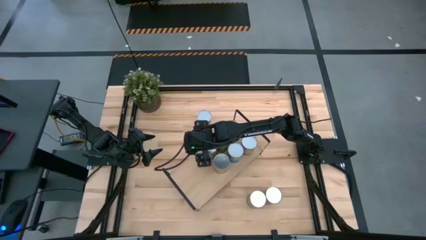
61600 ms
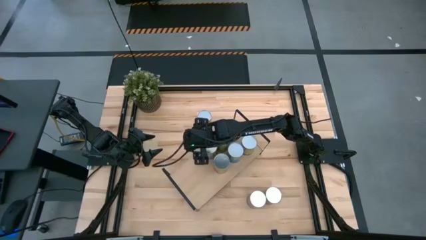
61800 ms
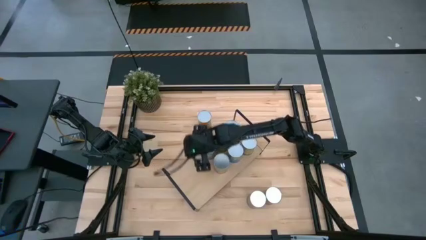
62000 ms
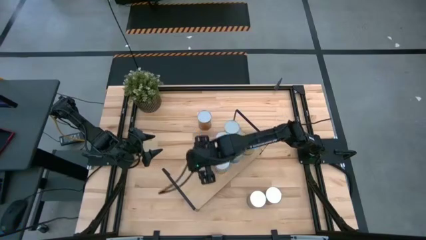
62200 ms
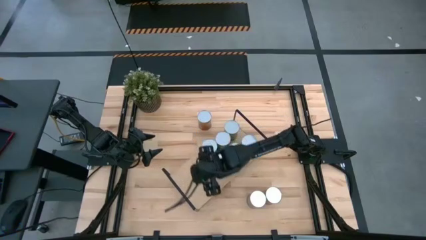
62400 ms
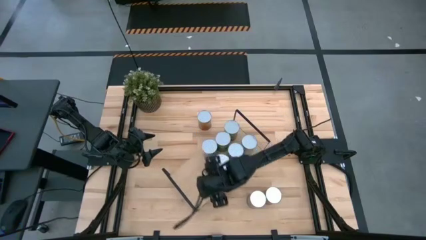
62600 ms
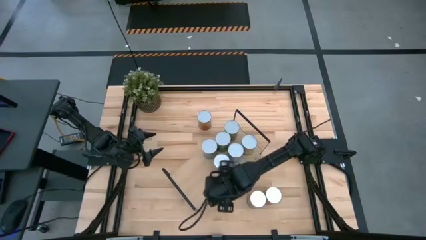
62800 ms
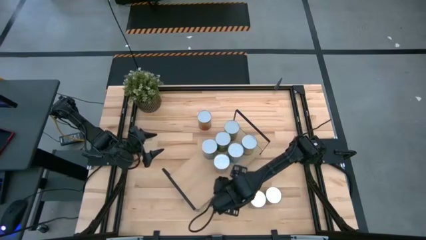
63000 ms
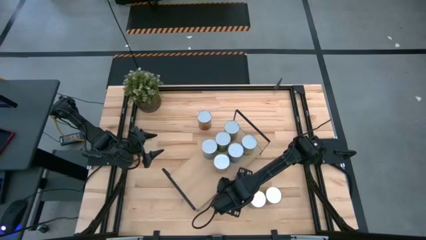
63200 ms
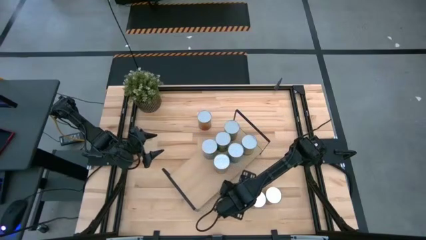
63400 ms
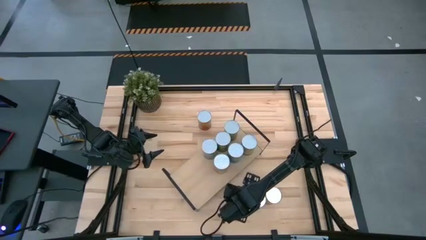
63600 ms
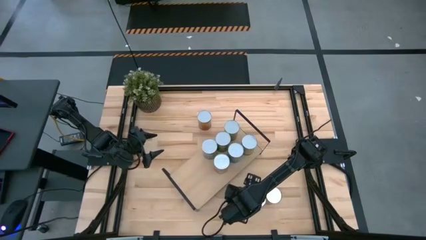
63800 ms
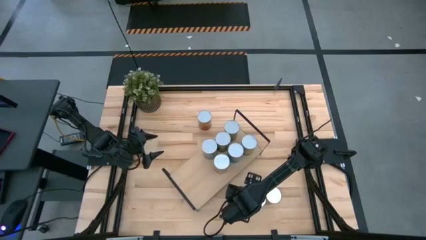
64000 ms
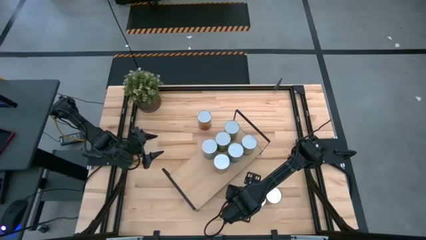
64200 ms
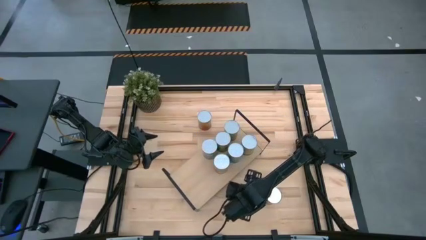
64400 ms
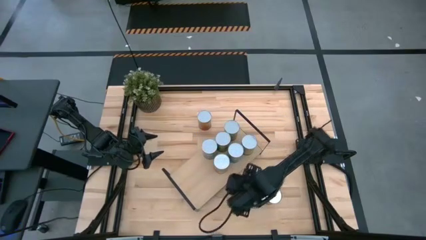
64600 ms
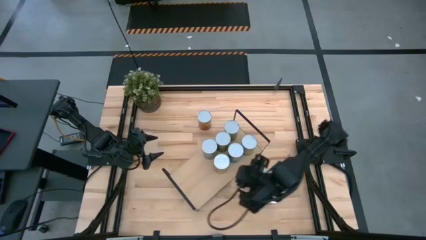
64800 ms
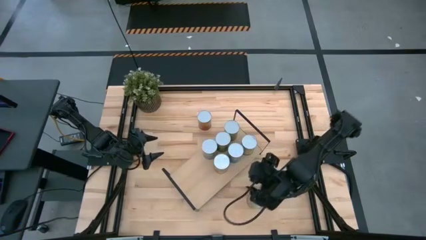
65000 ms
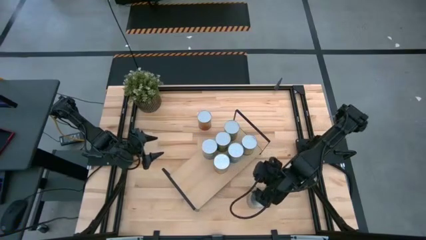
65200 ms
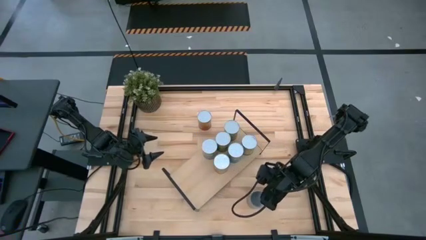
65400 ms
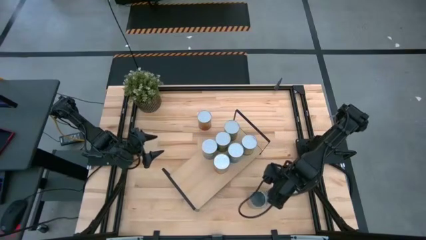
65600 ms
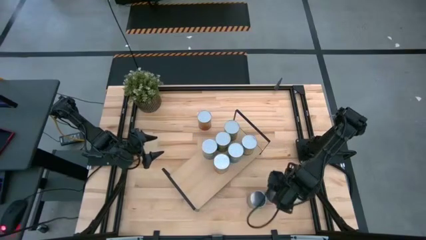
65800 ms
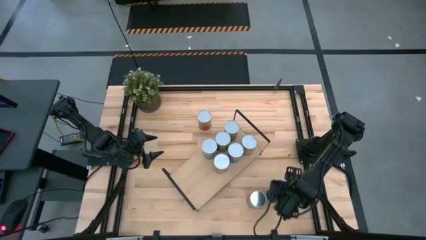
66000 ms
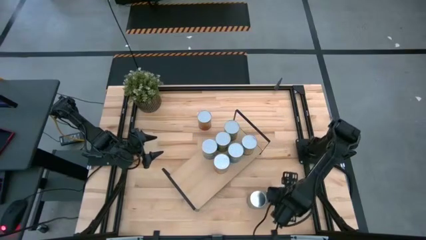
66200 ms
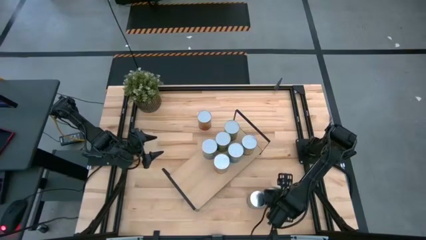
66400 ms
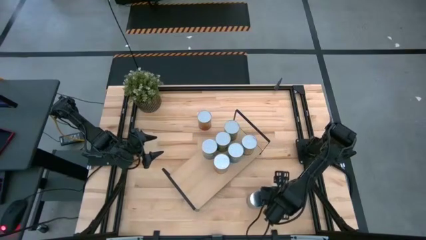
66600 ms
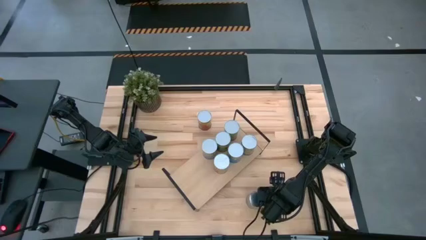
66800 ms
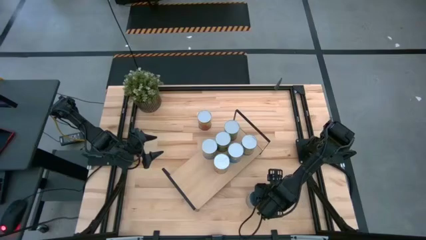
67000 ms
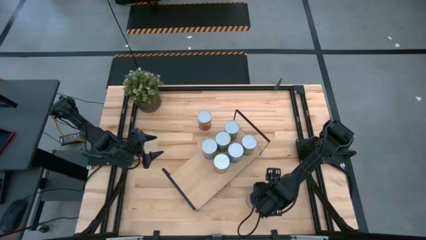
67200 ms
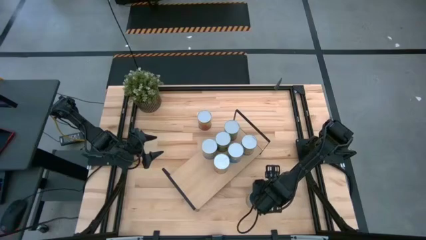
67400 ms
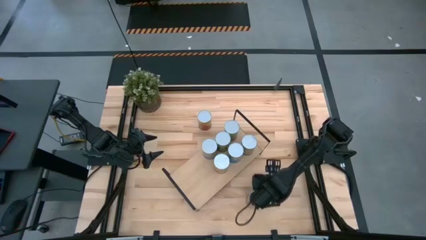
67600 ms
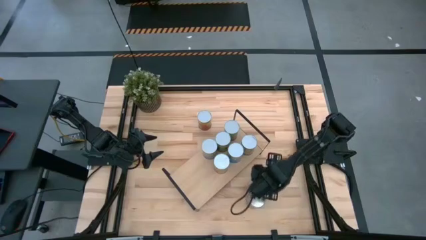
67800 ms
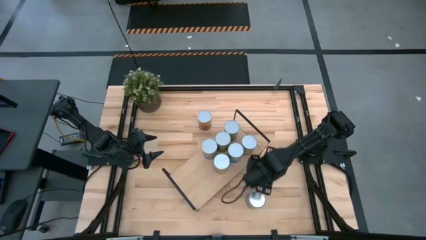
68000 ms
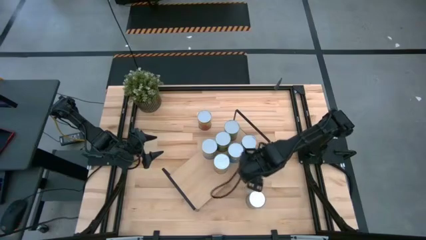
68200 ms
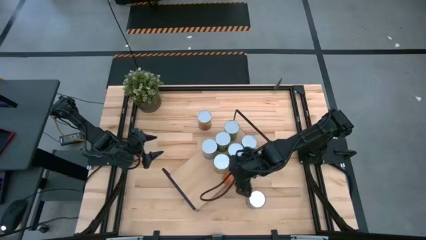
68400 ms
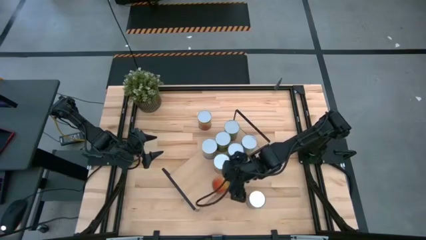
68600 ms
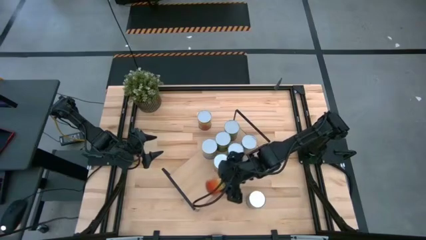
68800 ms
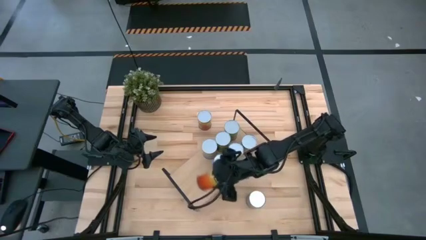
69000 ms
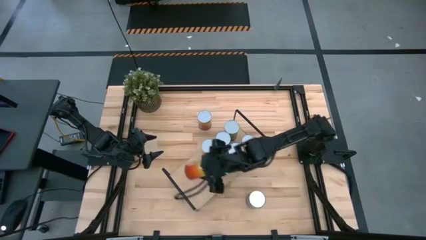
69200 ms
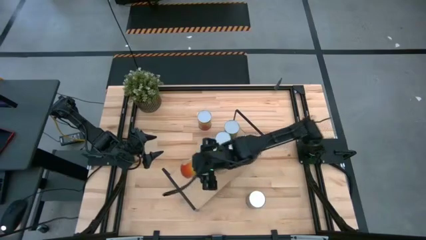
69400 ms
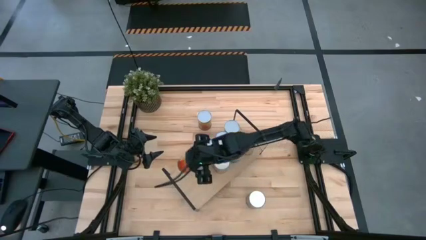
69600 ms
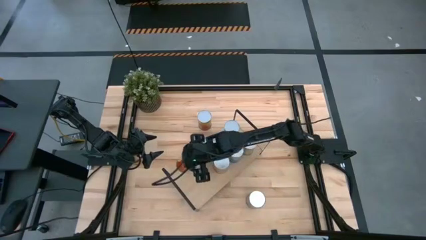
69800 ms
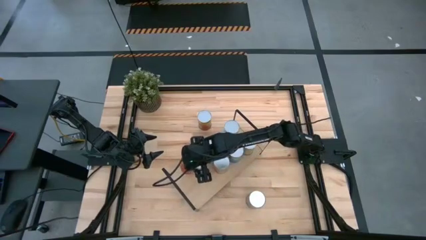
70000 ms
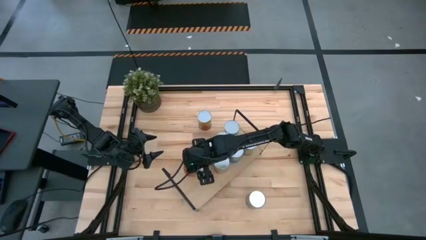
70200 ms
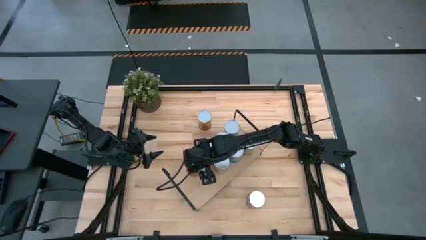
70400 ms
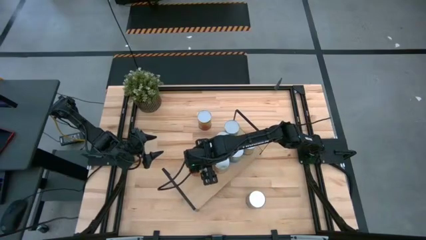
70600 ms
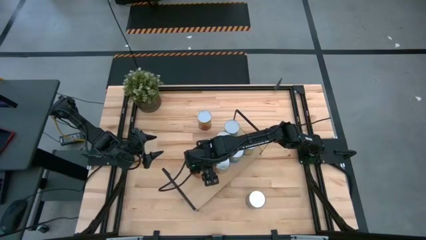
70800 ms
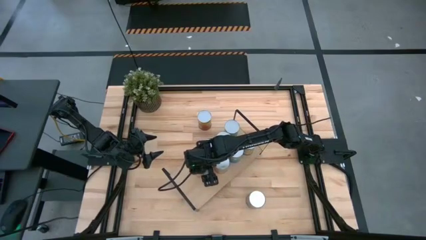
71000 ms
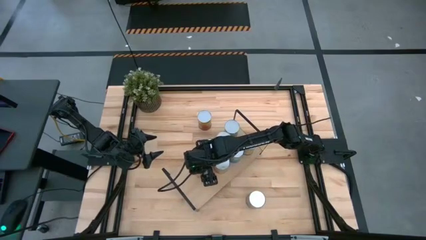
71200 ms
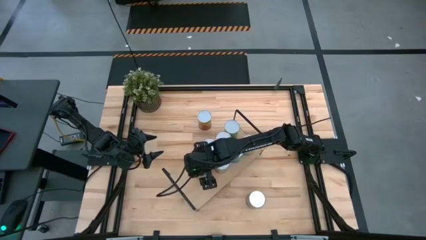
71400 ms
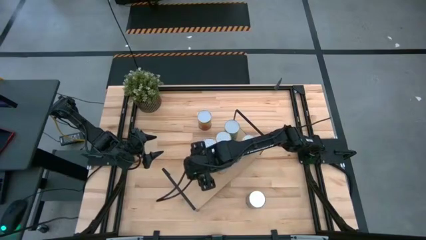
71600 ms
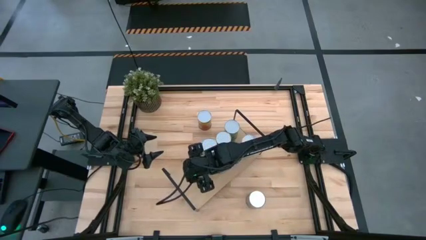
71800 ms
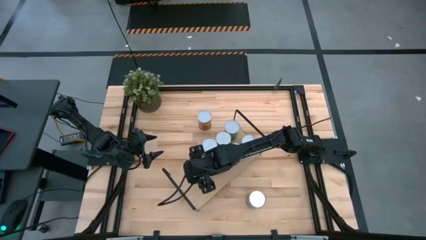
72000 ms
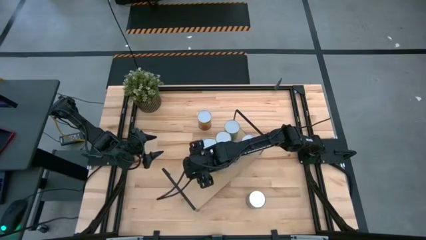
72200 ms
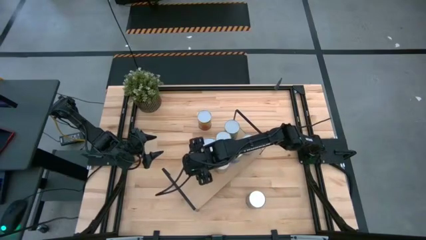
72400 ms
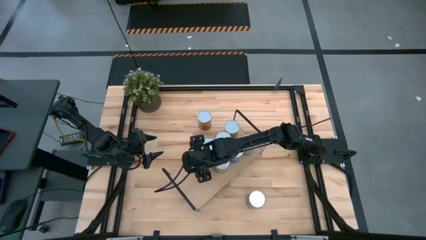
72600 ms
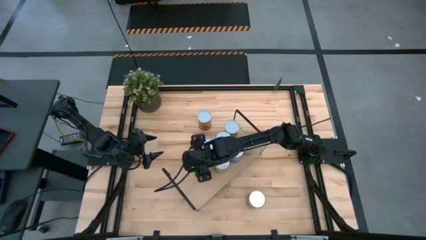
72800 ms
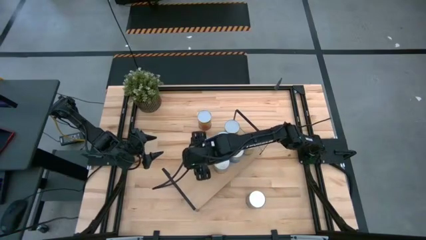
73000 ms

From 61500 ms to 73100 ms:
Task: Pick and place cans onto a shelf
Put the canned pineapple on the shelf

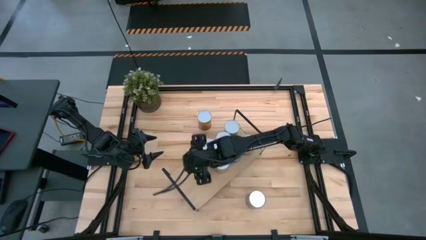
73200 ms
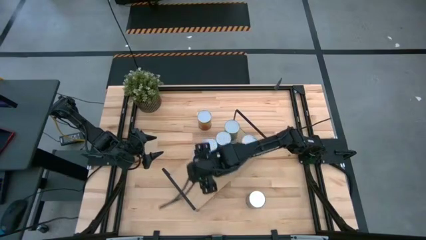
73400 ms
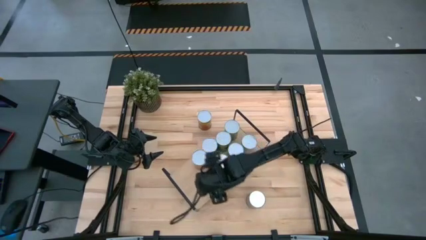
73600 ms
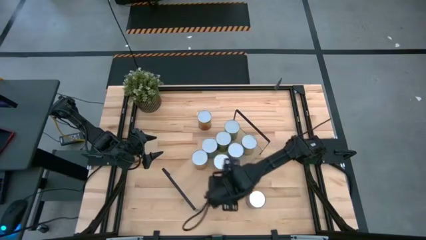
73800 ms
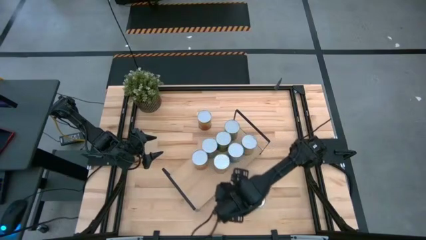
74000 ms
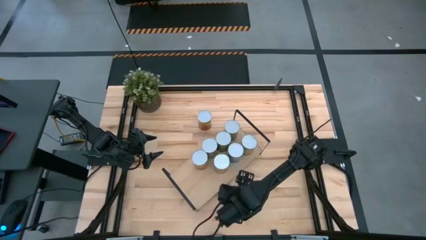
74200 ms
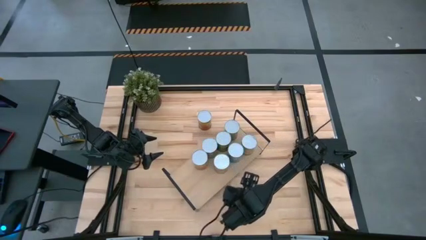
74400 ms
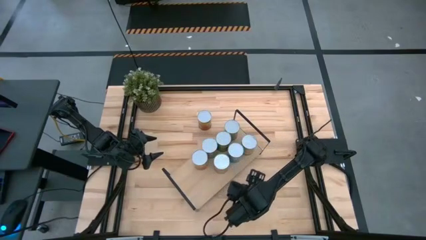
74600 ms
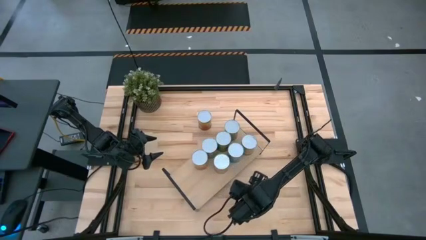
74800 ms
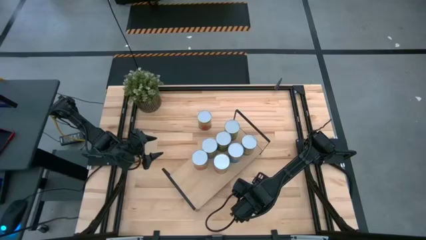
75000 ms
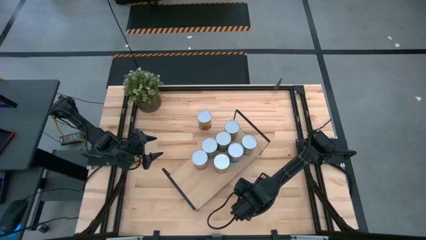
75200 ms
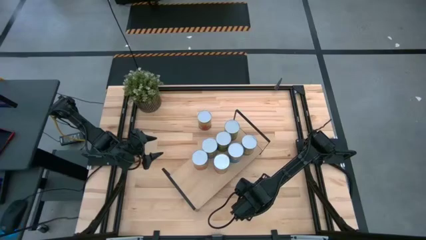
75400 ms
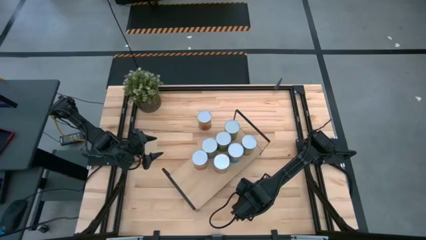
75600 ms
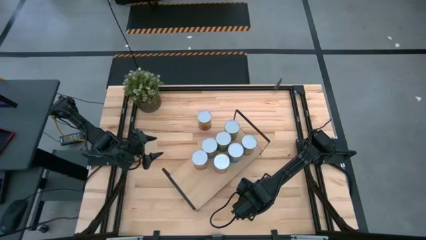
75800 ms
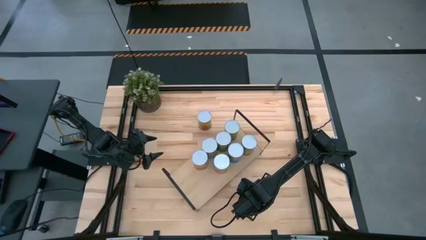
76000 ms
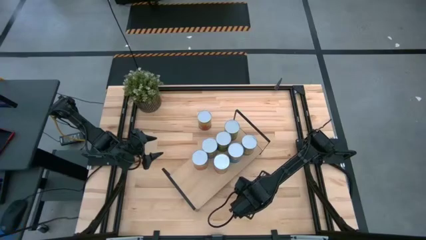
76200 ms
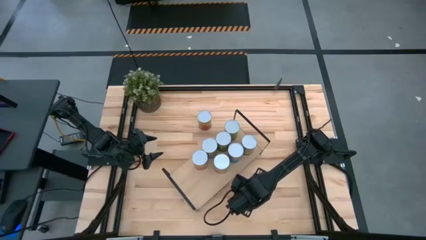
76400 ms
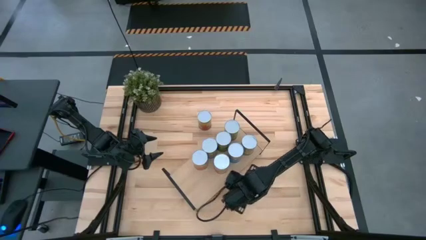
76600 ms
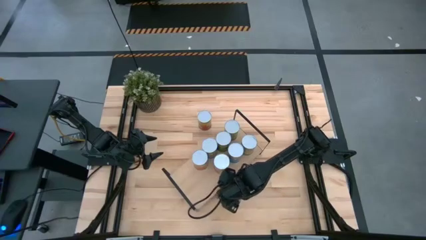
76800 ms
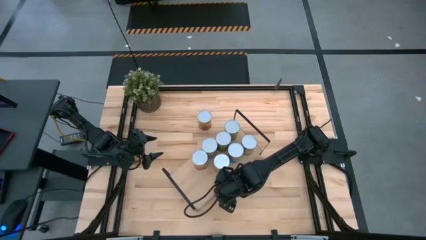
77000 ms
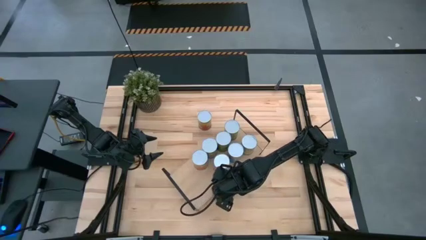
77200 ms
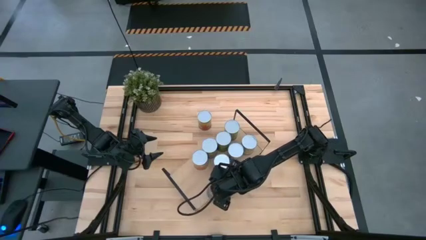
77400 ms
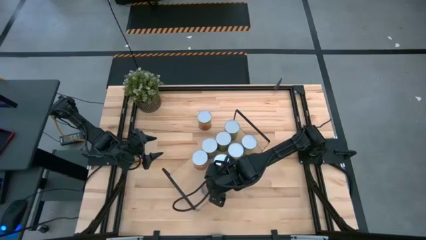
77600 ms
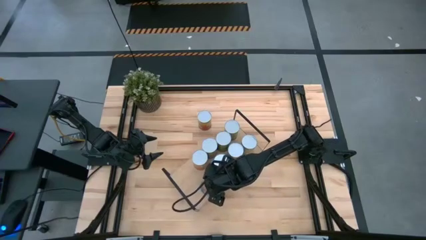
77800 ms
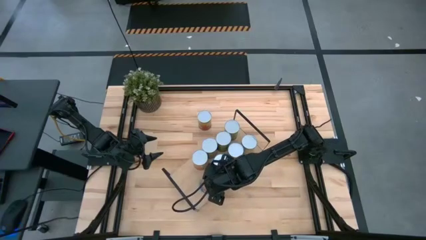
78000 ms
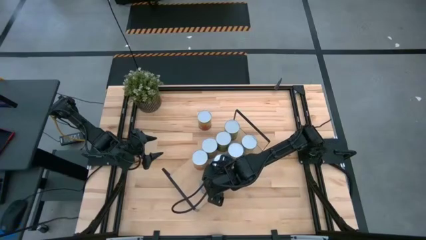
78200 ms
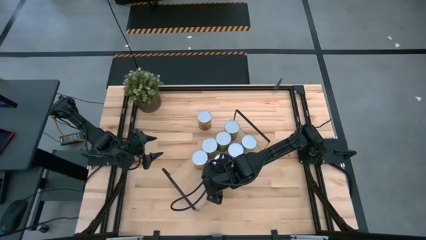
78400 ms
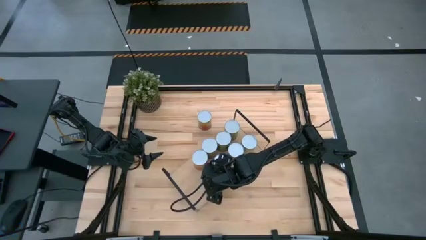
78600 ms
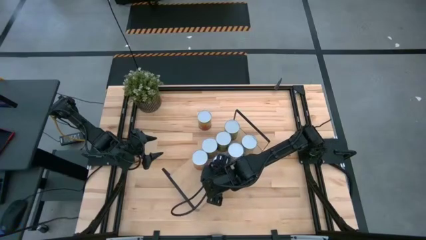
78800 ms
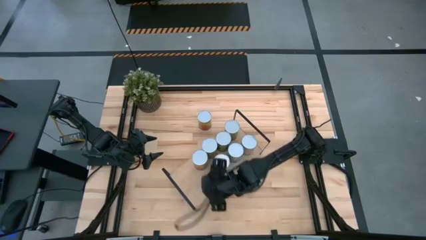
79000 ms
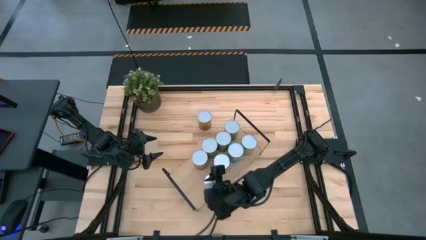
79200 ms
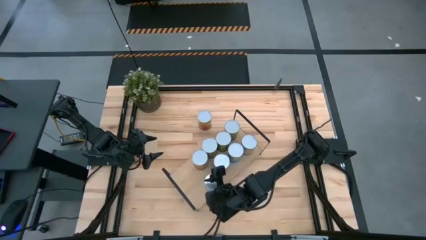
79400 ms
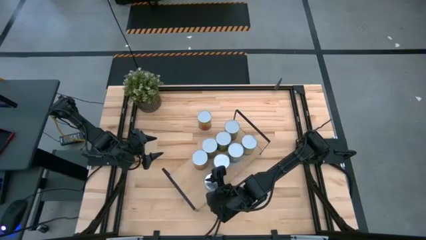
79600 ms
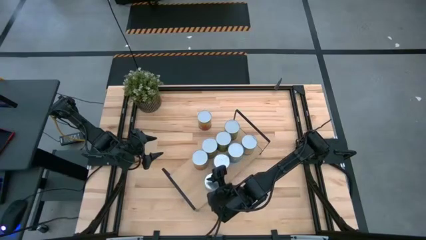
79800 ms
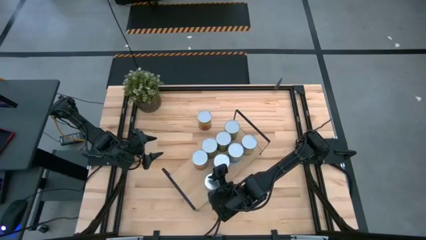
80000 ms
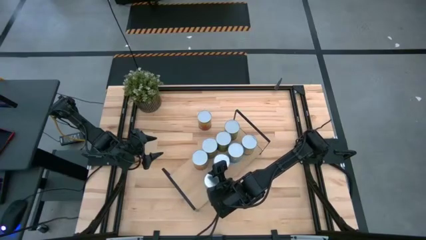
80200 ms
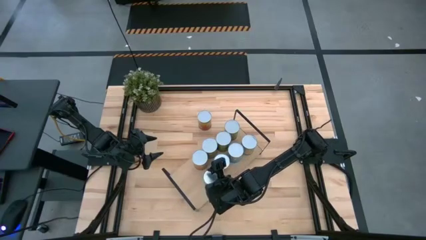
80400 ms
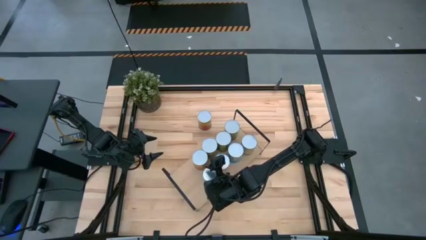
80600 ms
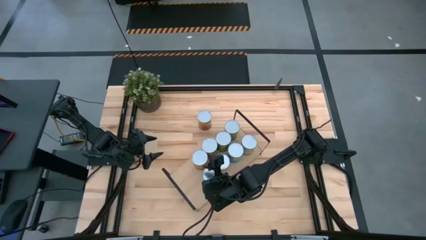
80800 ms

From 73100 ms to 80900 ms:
Put the canned tomatoes on the shelf
